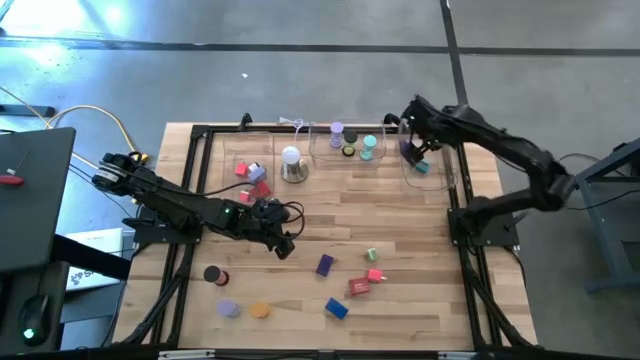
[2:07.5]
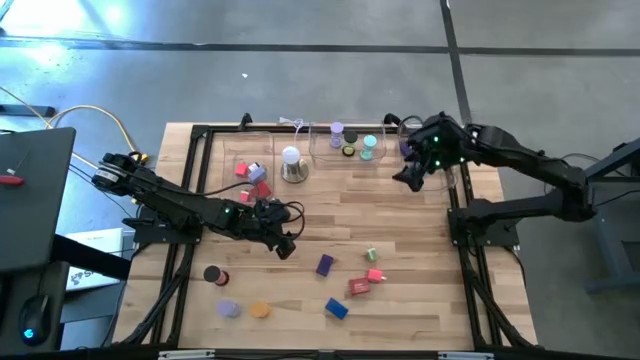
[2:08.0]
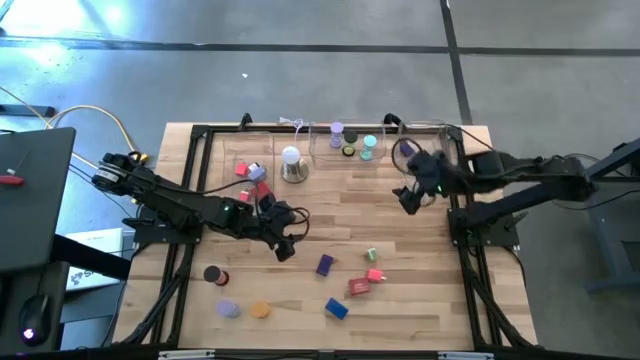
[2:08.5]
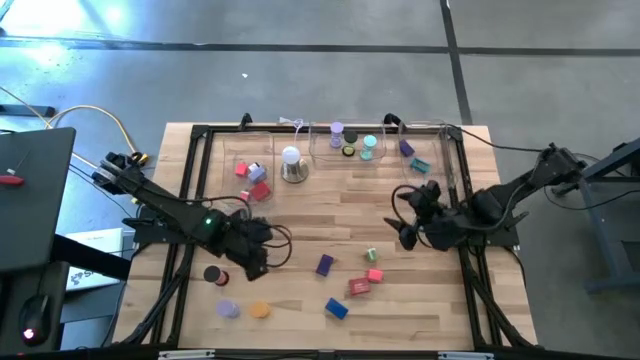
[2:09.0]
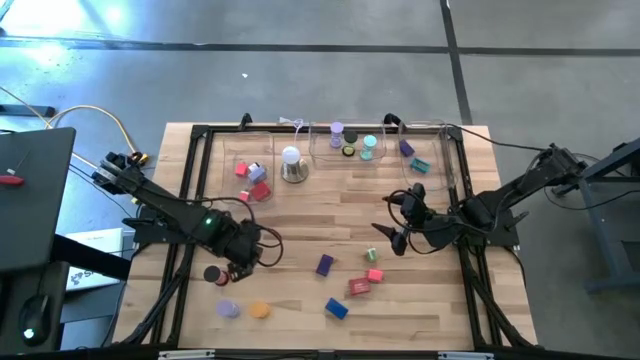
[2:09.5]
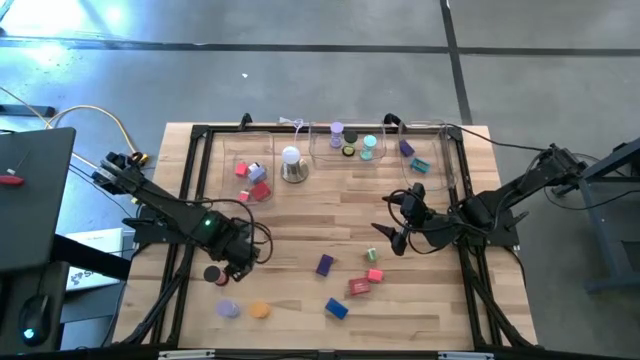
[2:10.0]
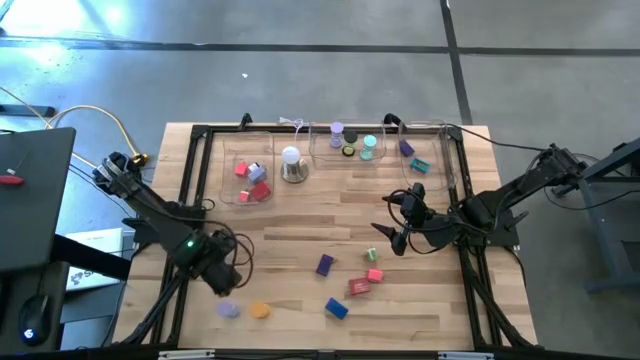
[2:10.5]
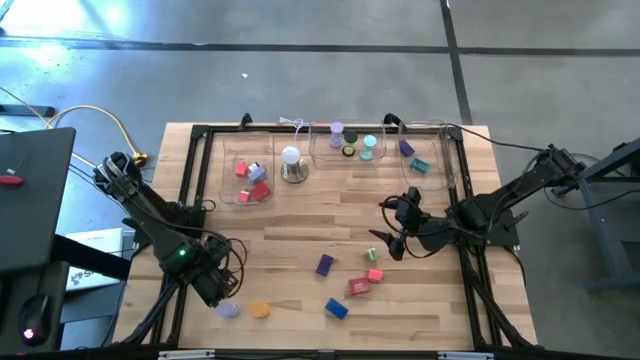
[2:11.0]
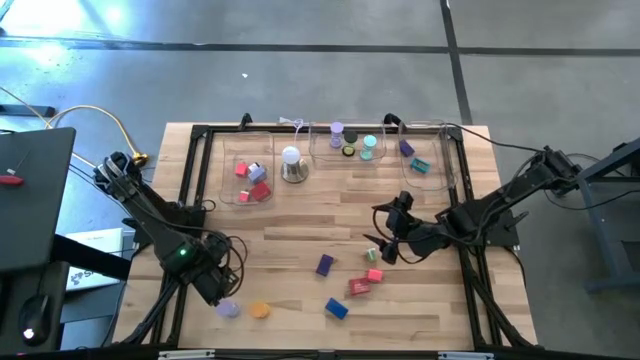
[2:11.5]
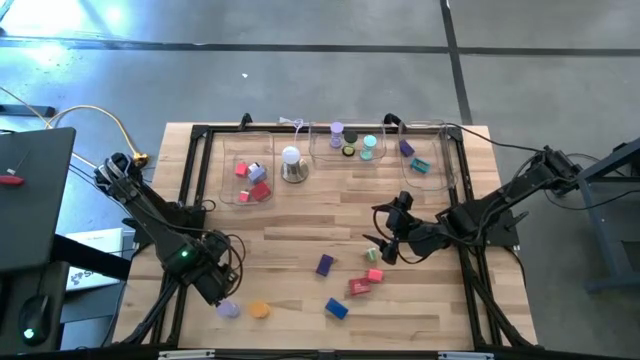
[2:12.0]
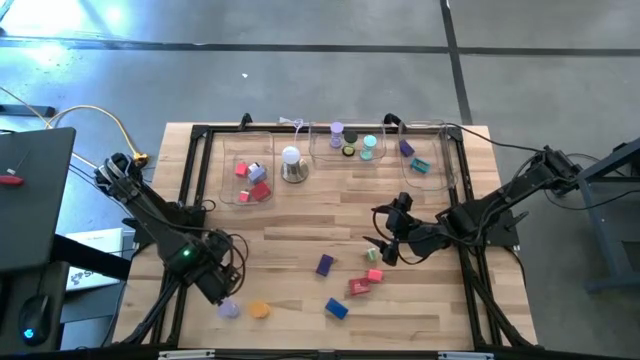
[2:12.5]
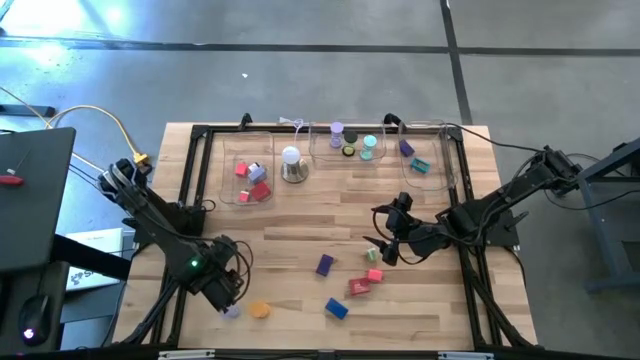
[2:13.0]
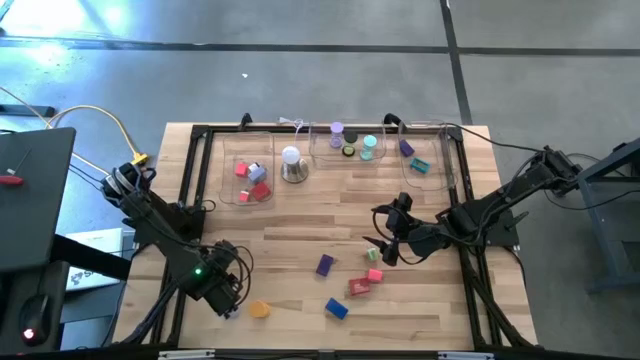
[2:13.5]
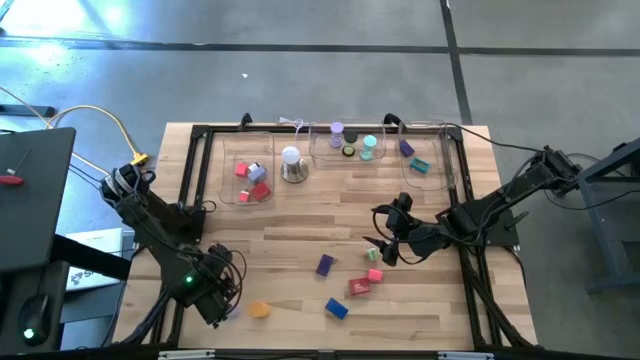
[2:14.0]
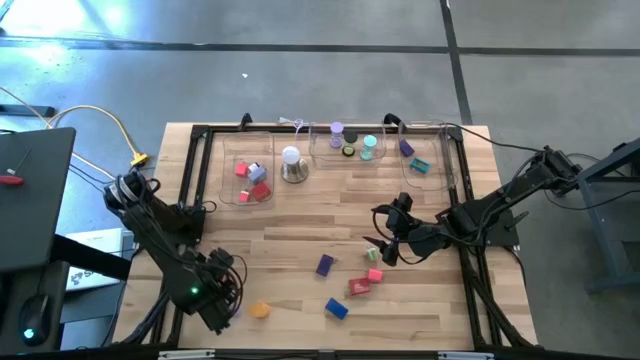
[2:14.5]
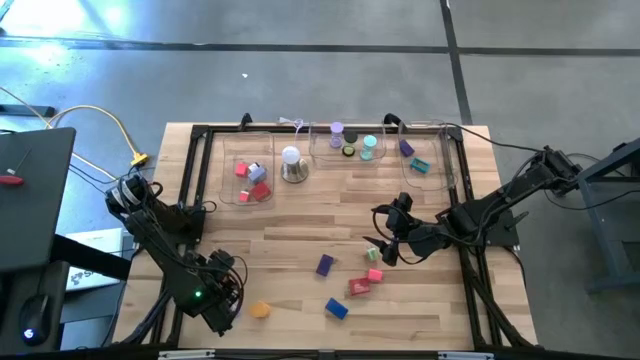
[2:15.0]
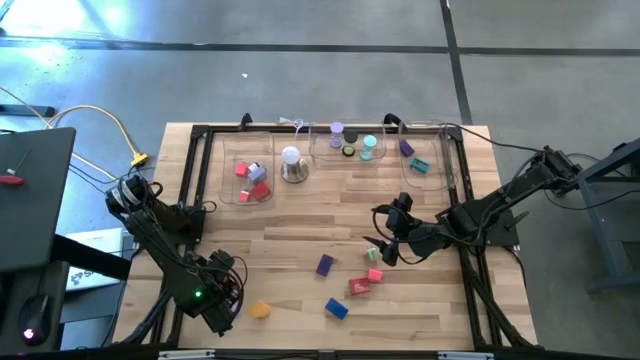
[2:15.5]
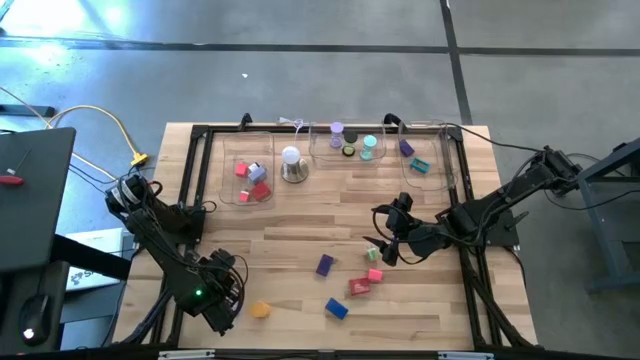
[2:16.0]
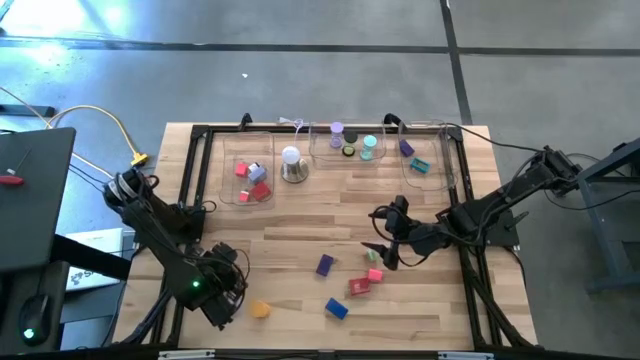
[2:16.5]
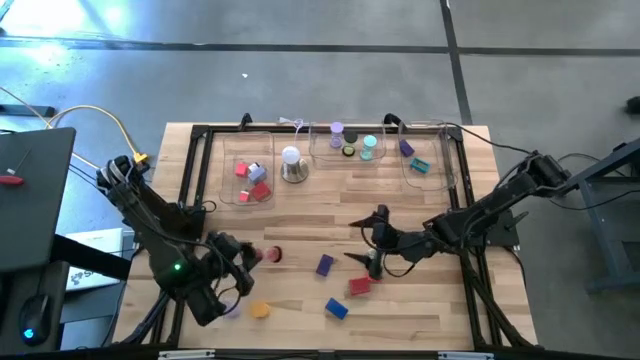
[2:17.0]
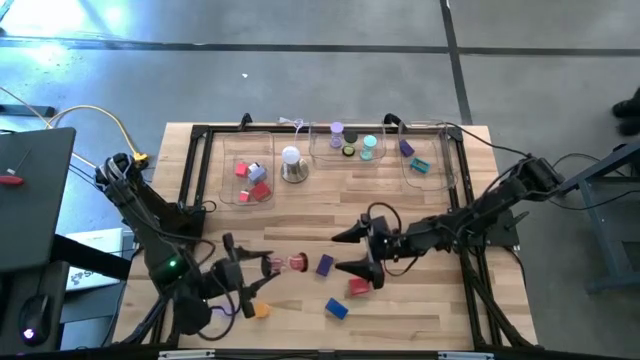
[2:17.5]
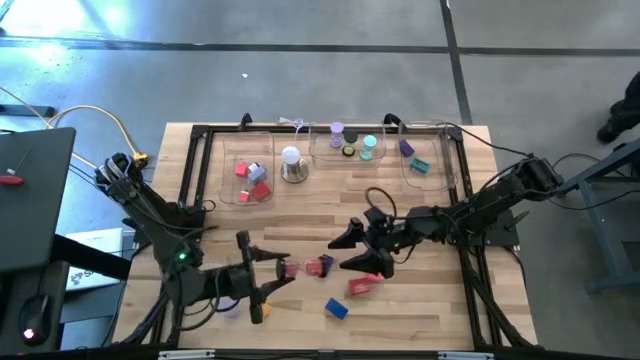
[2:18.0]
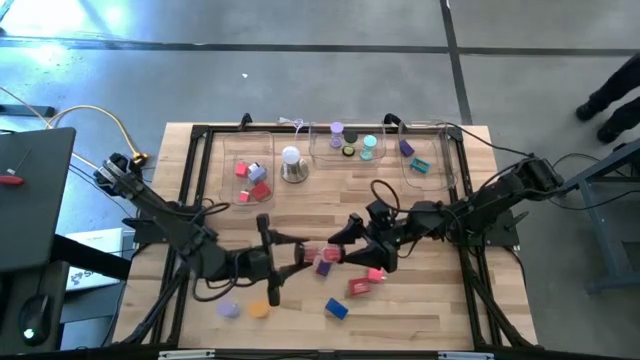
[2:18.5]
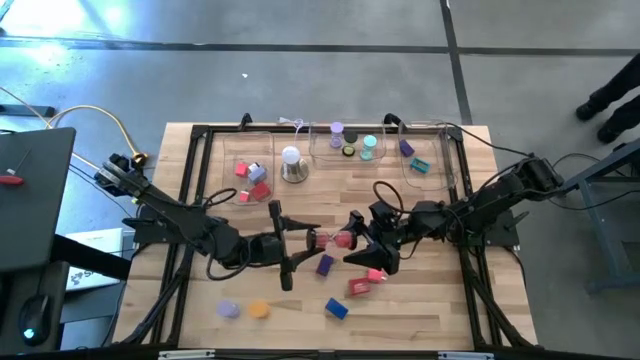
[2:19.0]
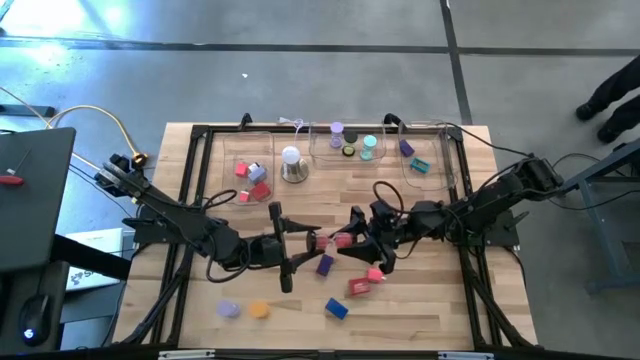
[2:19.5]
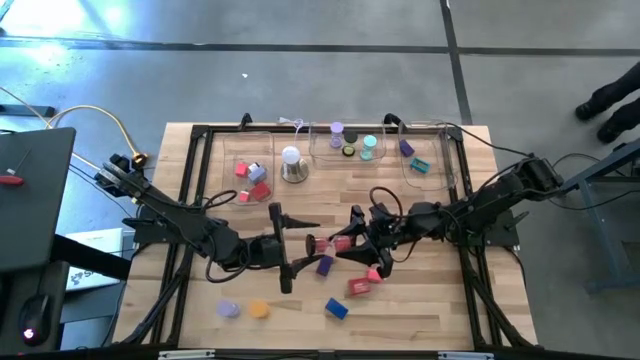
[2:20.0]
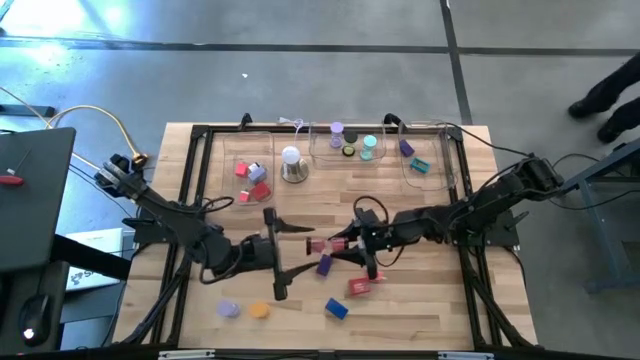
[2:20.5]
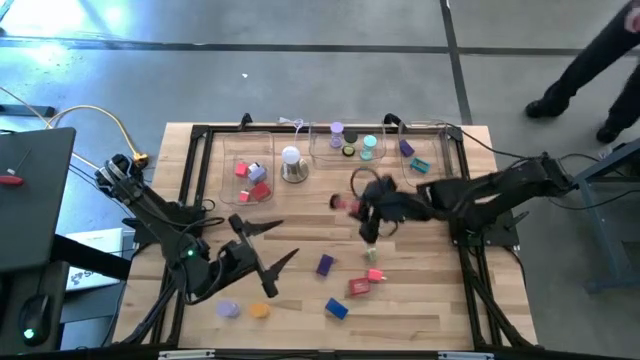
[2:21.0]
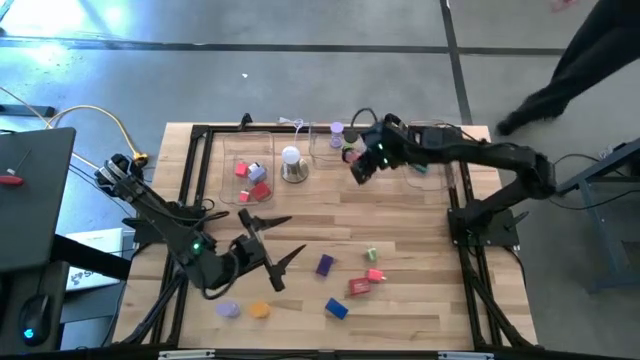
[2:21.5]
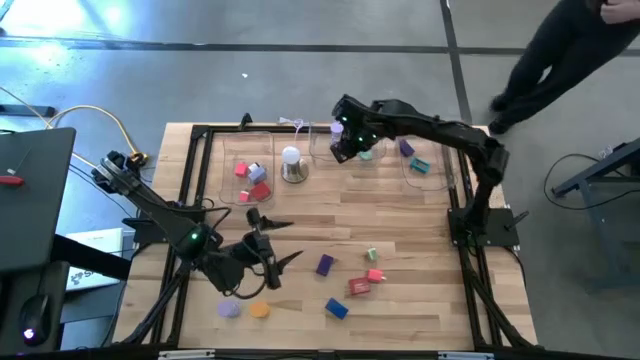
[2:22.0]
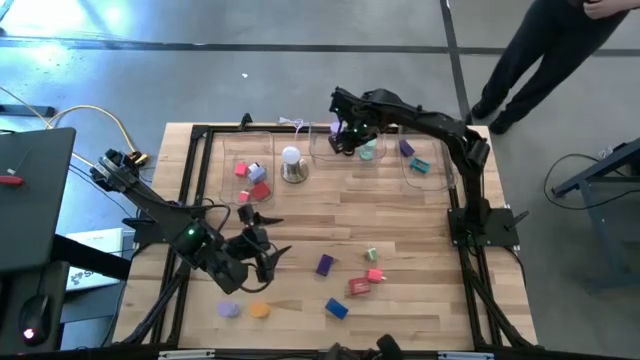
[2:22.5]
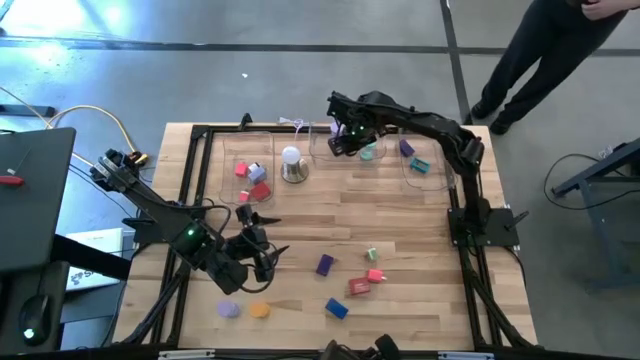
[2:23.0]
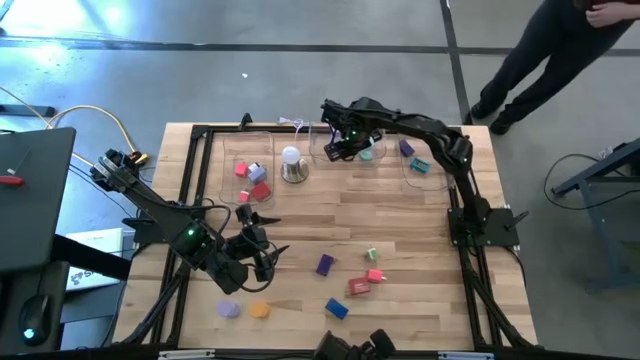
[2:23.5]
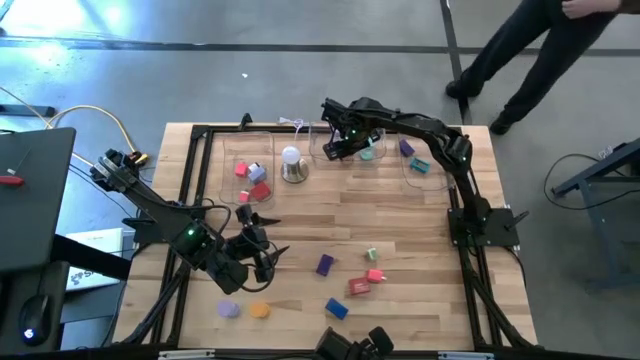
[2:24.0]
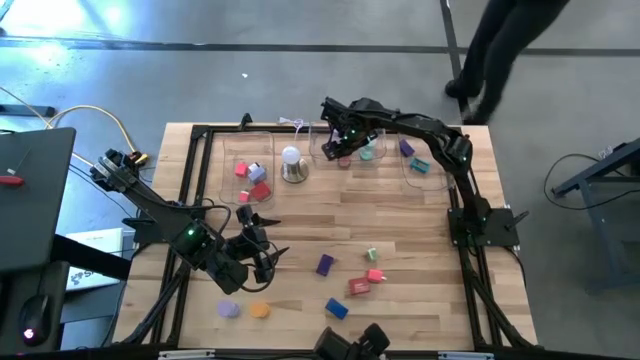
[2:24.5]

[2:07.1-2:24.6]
Task: Pick & Place Office items
Put the black pink hourglass into the middle transparent bin

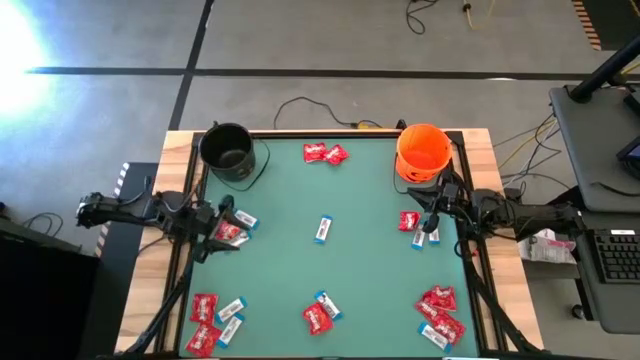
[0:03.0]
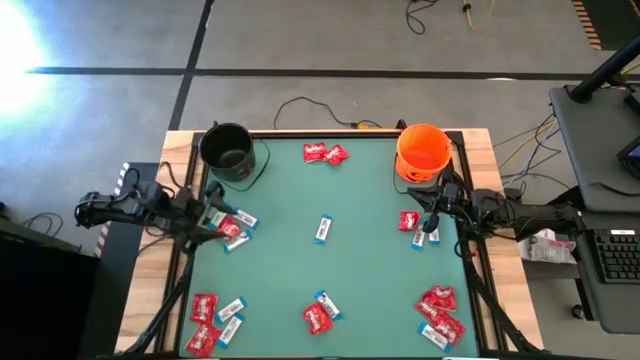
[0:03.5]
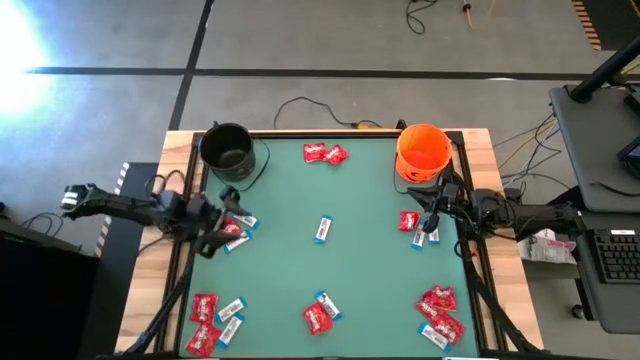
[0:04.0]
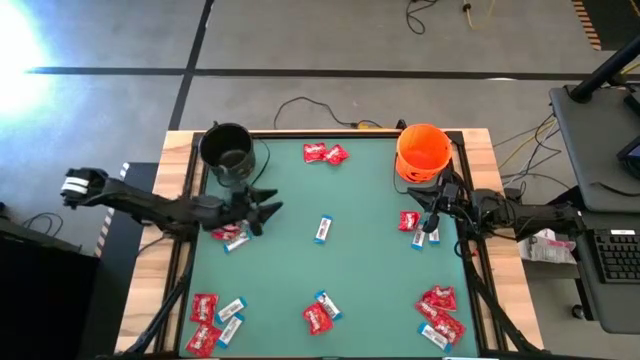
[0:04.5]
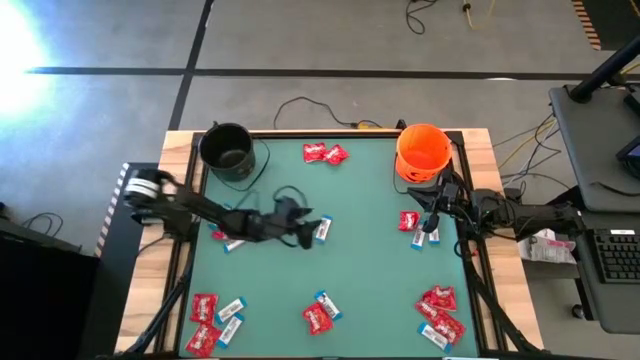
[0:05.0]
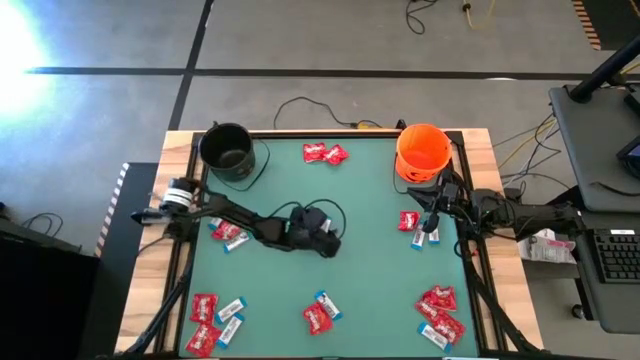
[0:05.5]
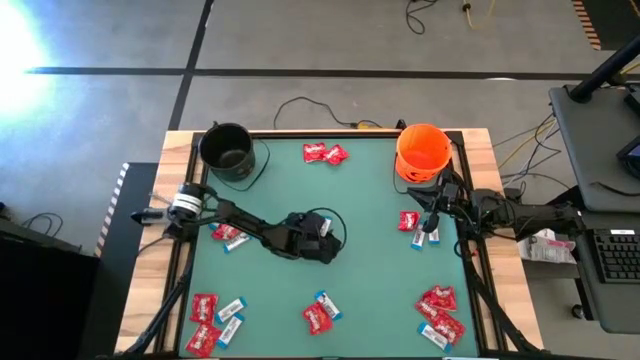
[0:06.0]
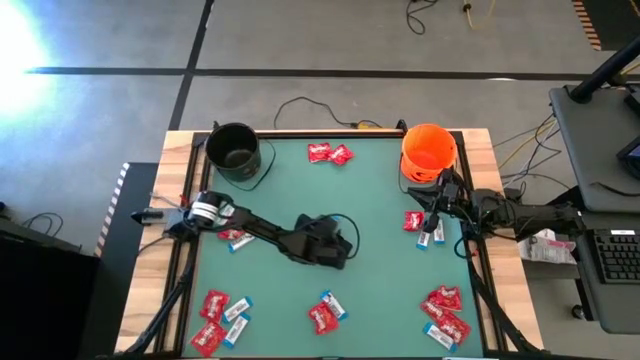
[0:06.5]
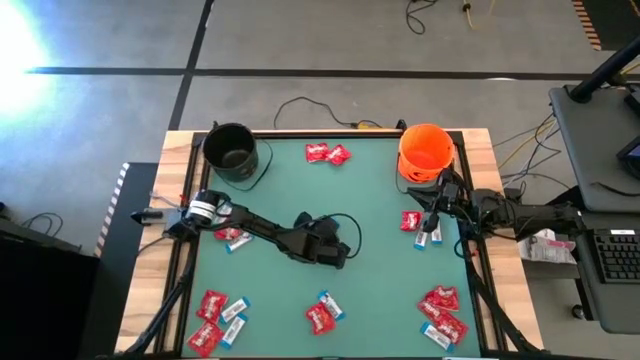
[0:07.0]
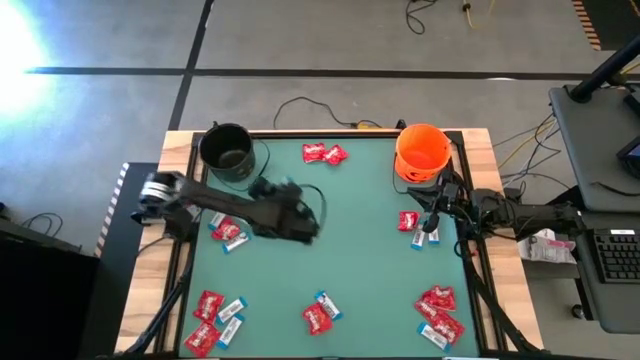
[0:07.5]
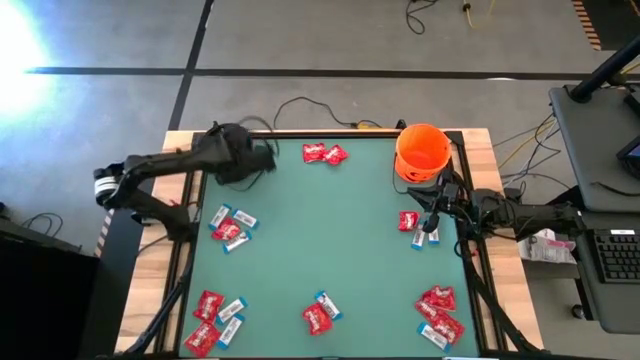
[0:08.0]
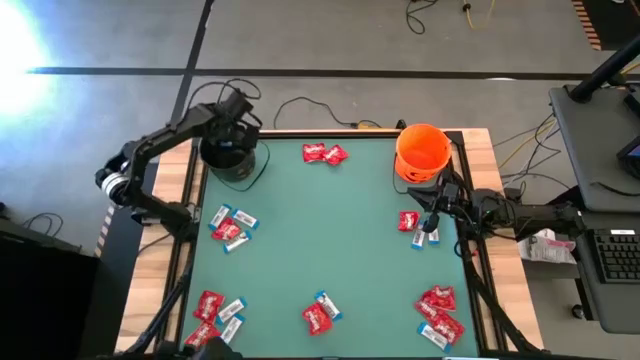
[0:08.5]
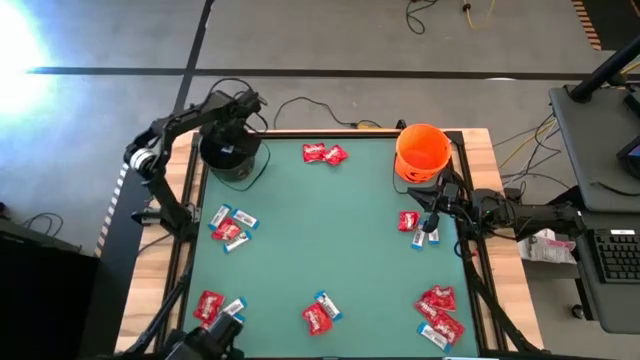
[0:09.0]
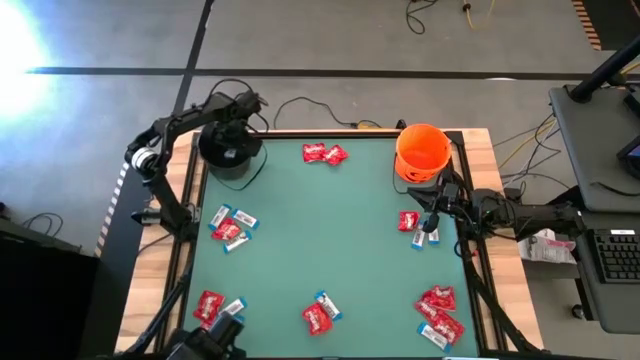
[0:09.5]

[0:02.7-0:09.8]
Task: Sort candy by brand, put in halloween buckets
Put the white chocolate into the black bucket
